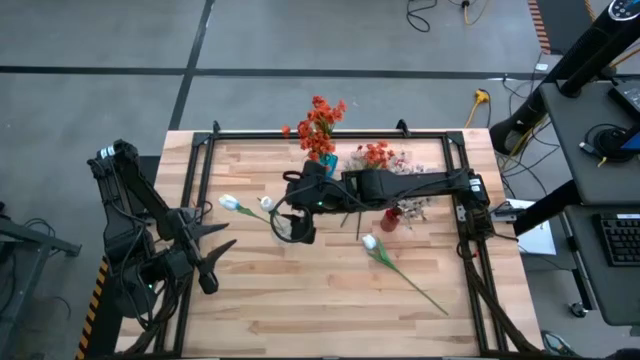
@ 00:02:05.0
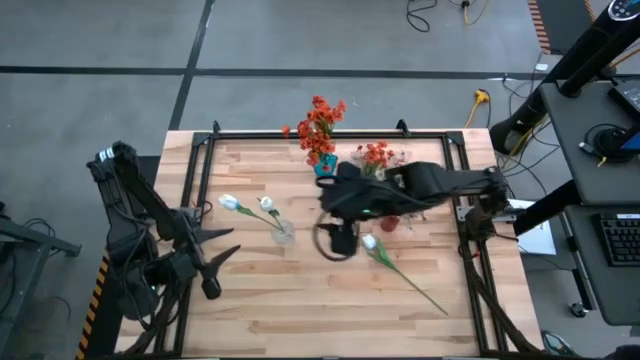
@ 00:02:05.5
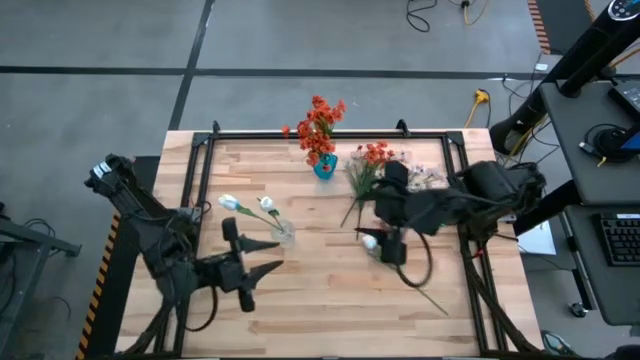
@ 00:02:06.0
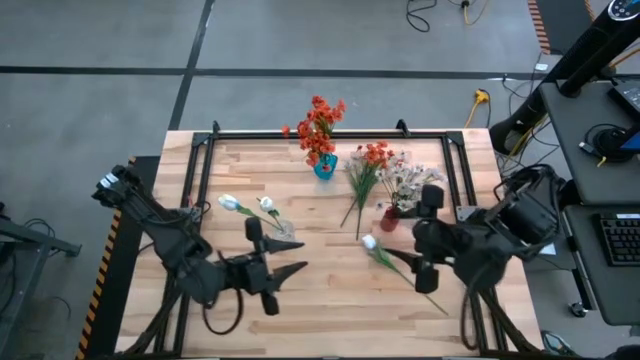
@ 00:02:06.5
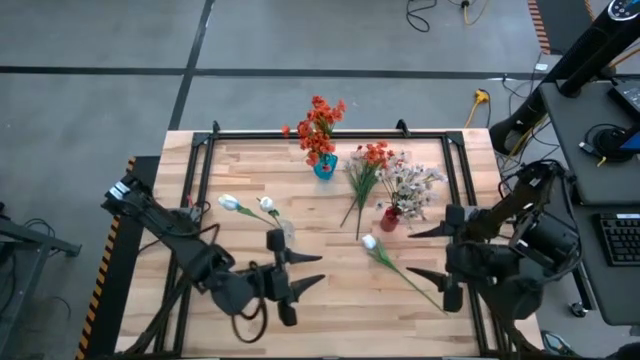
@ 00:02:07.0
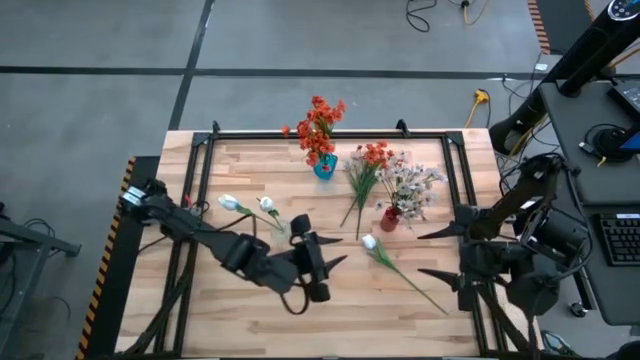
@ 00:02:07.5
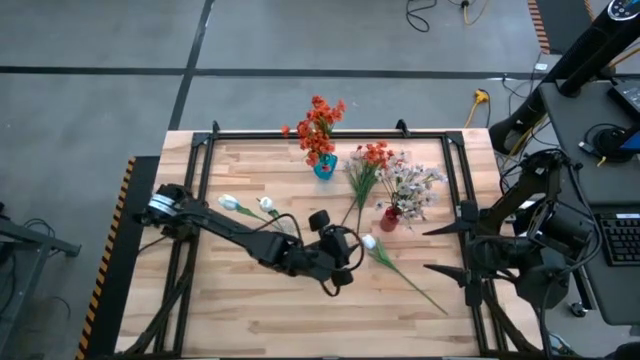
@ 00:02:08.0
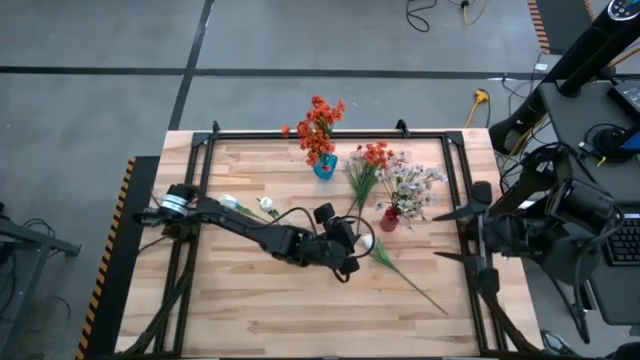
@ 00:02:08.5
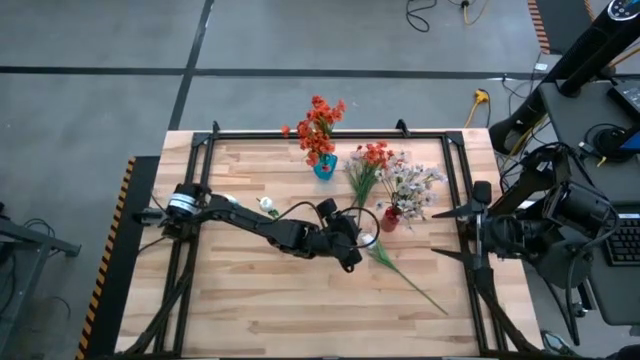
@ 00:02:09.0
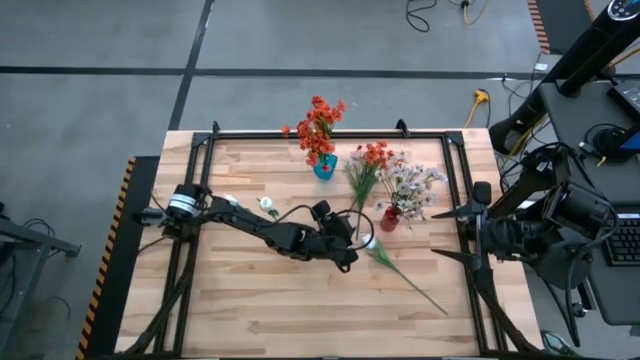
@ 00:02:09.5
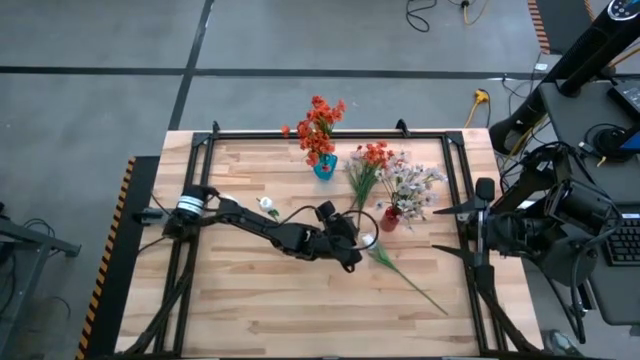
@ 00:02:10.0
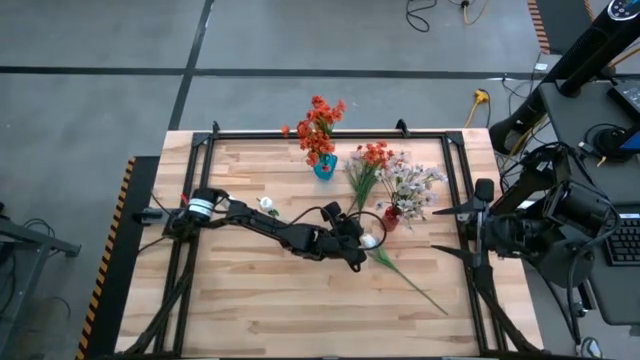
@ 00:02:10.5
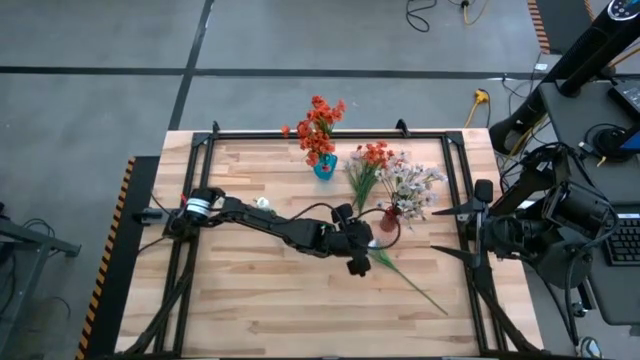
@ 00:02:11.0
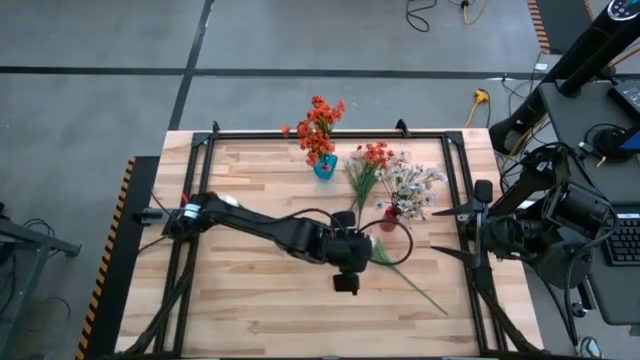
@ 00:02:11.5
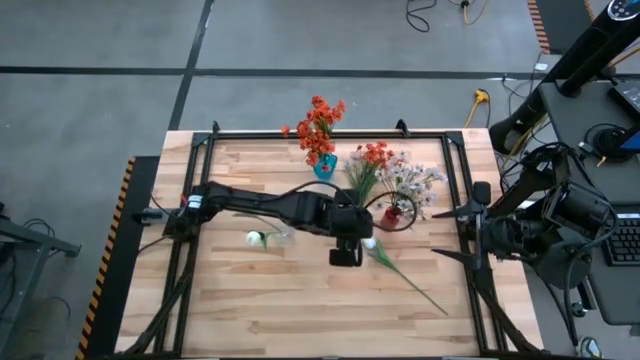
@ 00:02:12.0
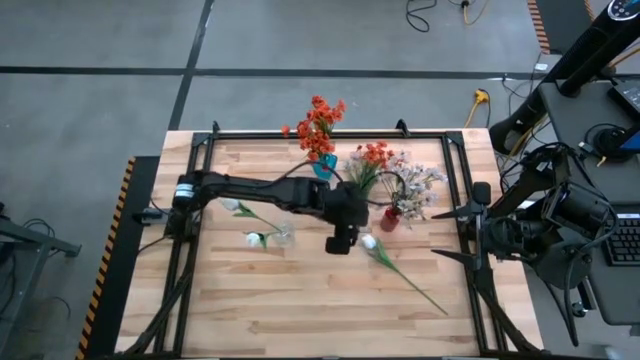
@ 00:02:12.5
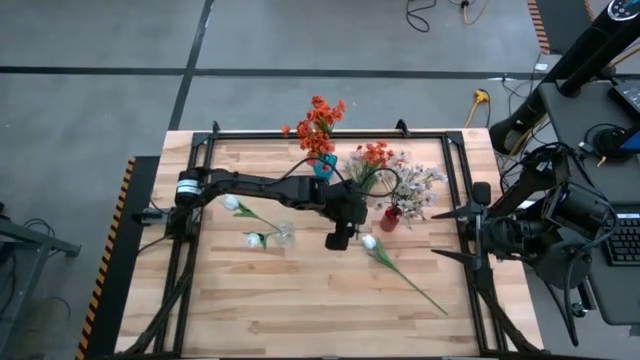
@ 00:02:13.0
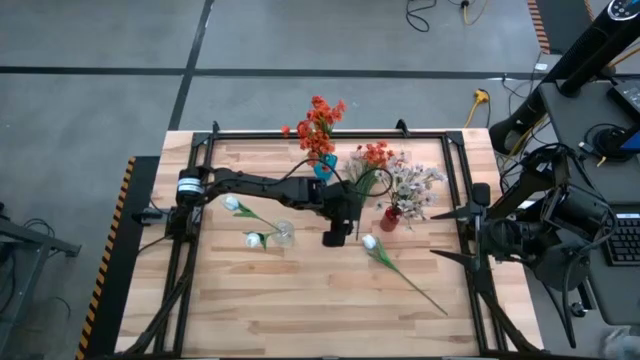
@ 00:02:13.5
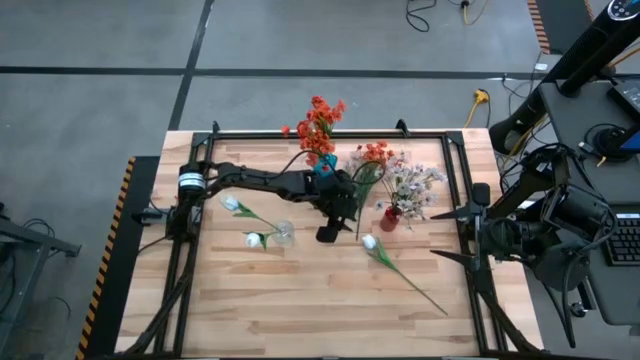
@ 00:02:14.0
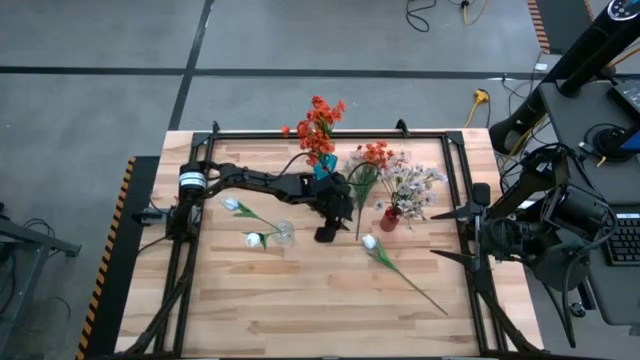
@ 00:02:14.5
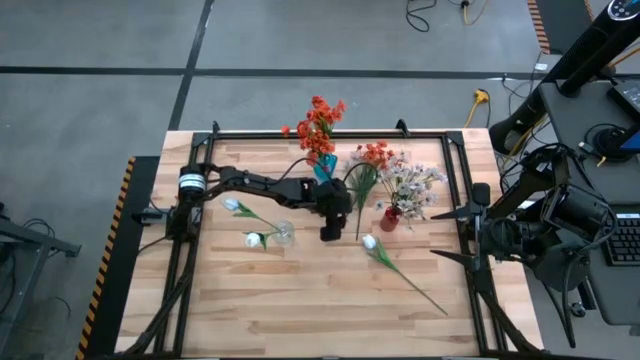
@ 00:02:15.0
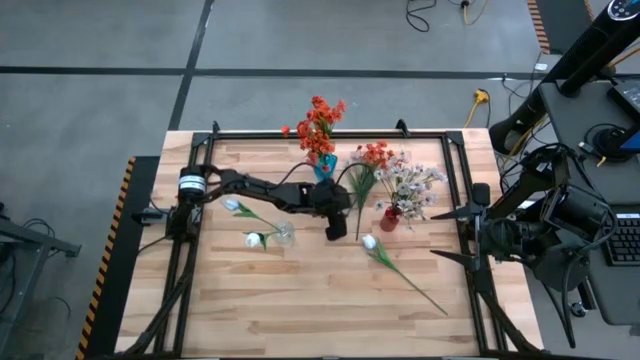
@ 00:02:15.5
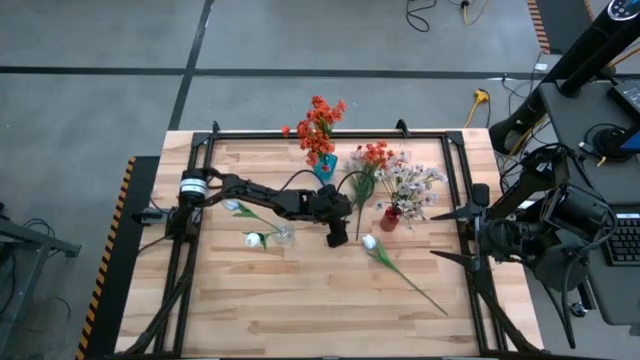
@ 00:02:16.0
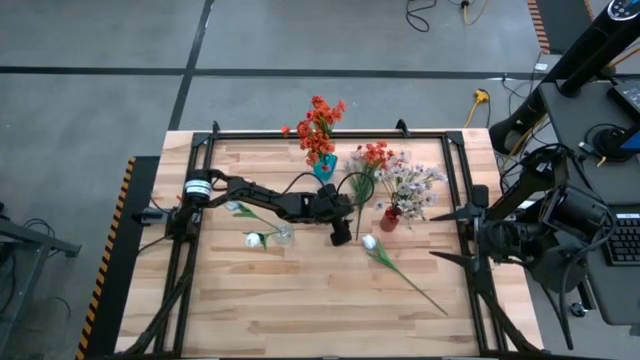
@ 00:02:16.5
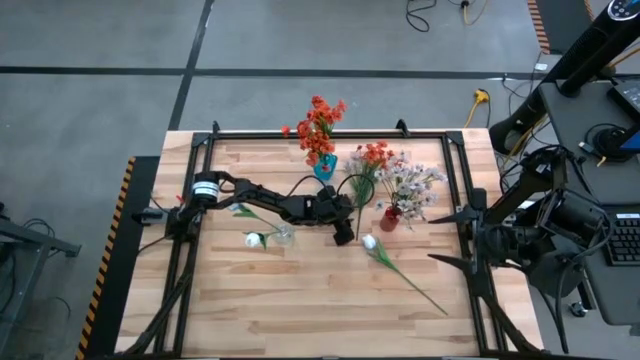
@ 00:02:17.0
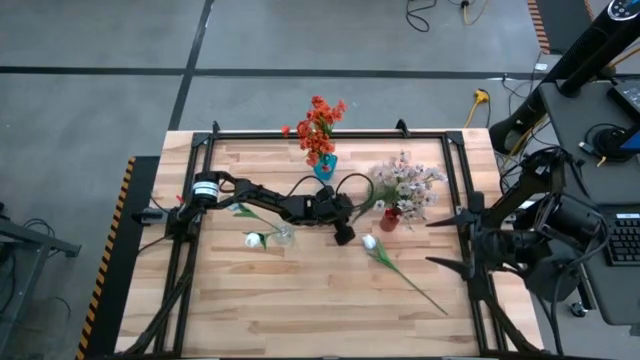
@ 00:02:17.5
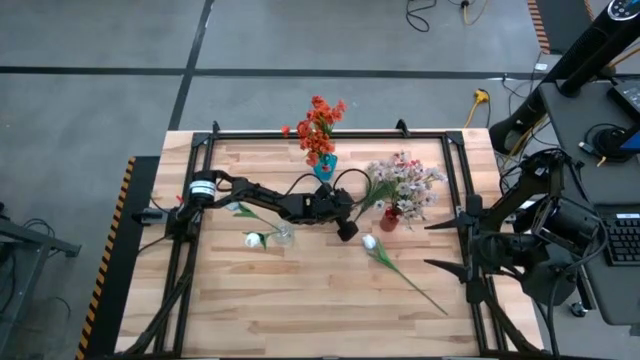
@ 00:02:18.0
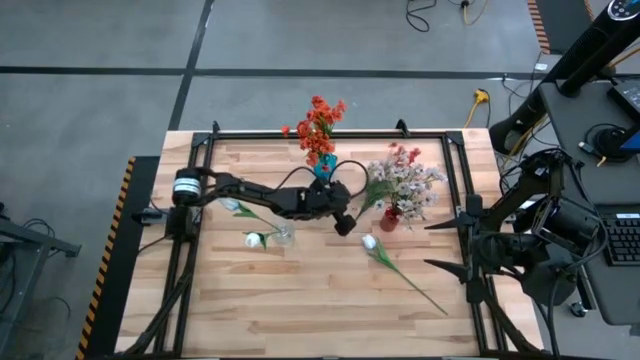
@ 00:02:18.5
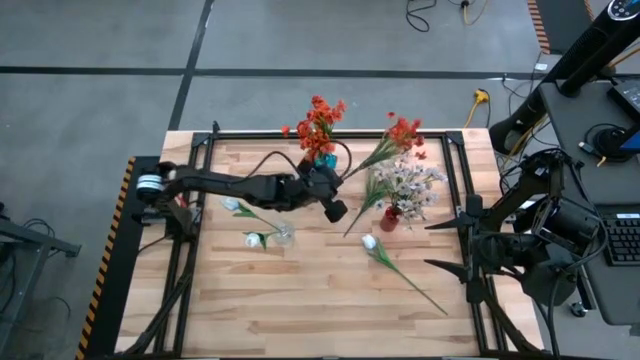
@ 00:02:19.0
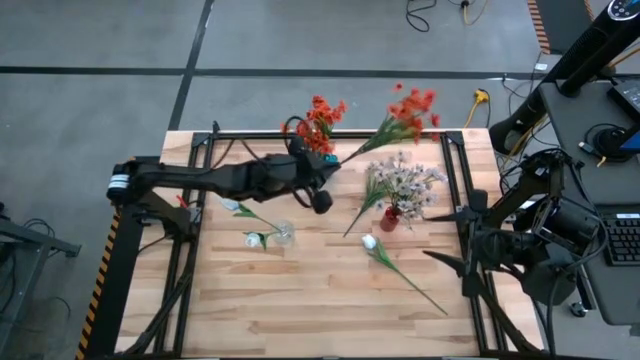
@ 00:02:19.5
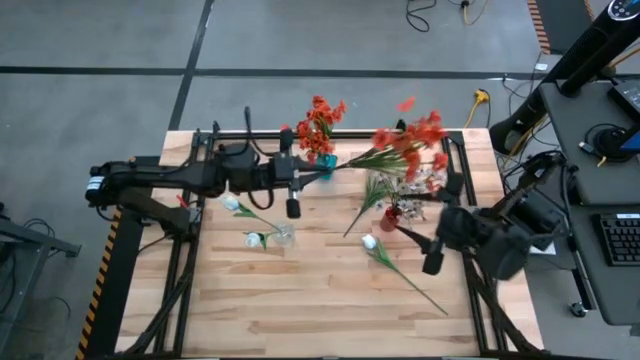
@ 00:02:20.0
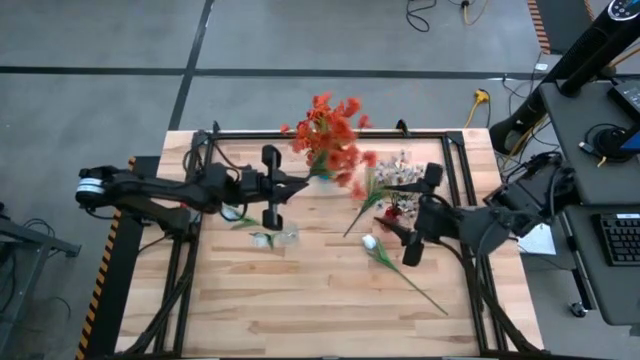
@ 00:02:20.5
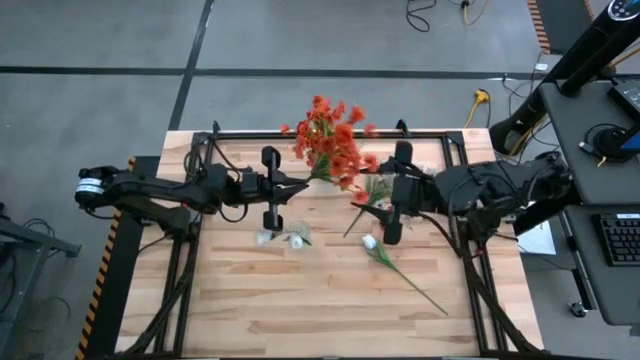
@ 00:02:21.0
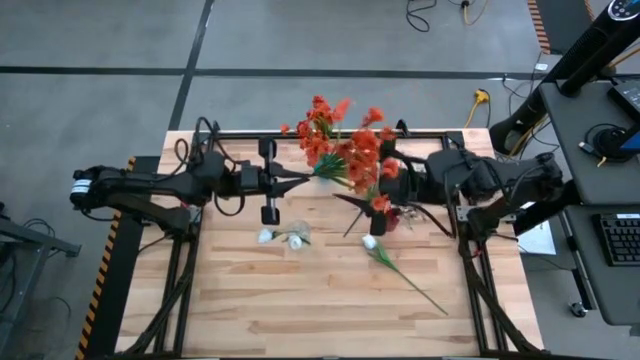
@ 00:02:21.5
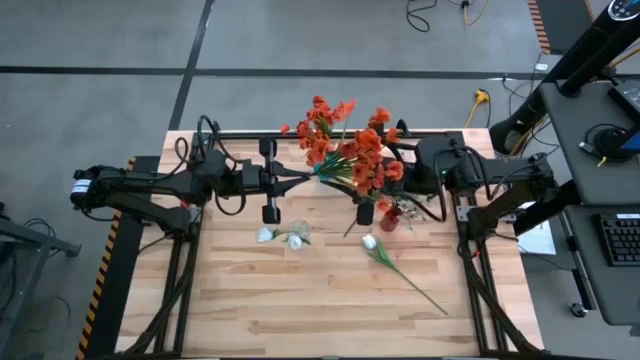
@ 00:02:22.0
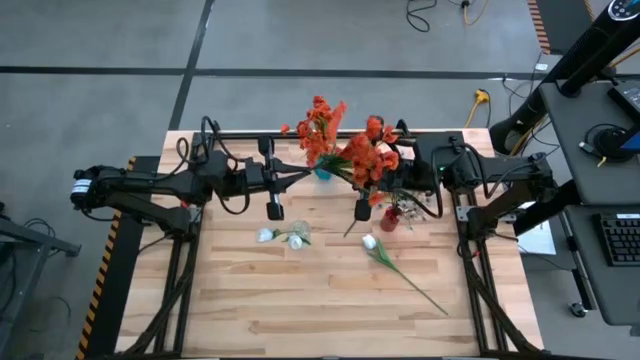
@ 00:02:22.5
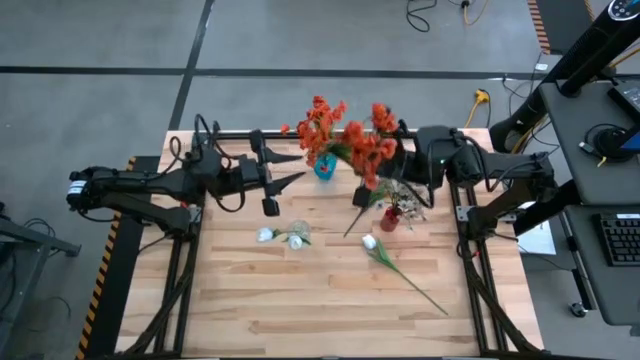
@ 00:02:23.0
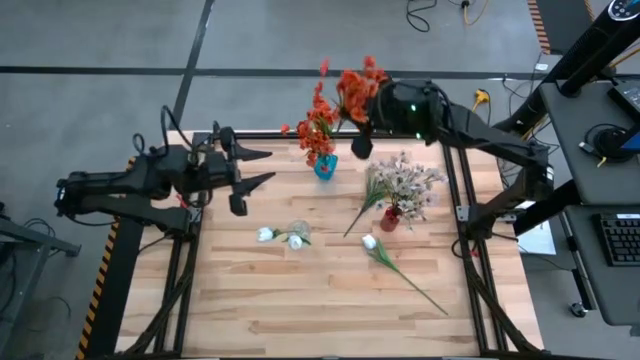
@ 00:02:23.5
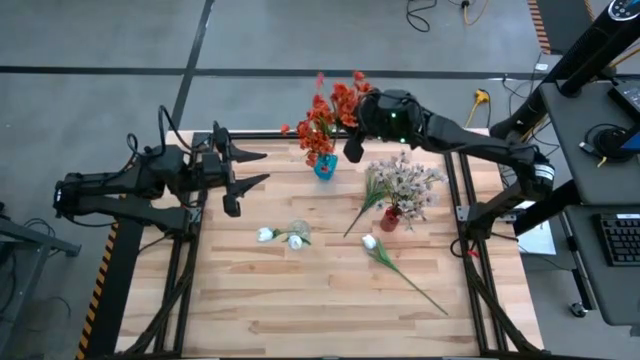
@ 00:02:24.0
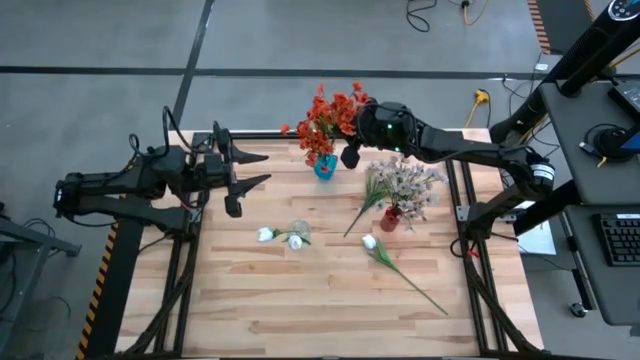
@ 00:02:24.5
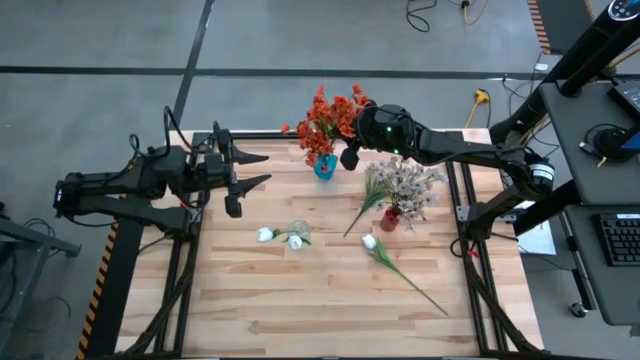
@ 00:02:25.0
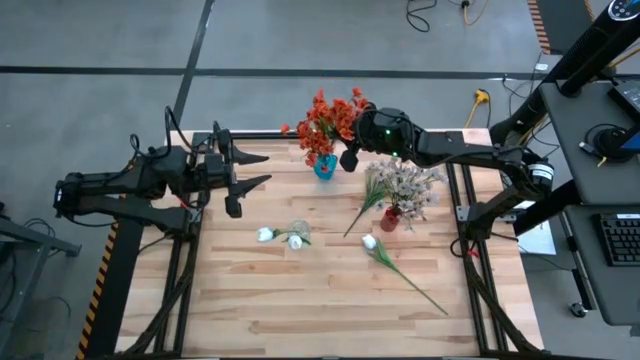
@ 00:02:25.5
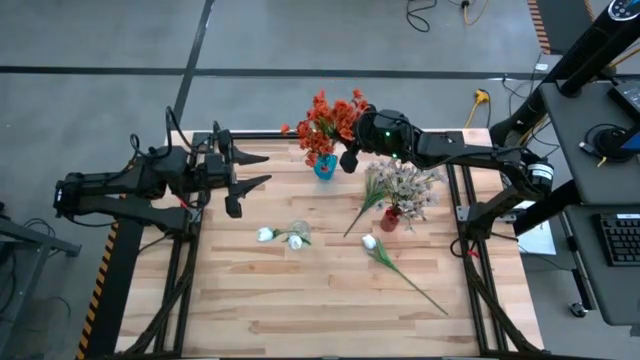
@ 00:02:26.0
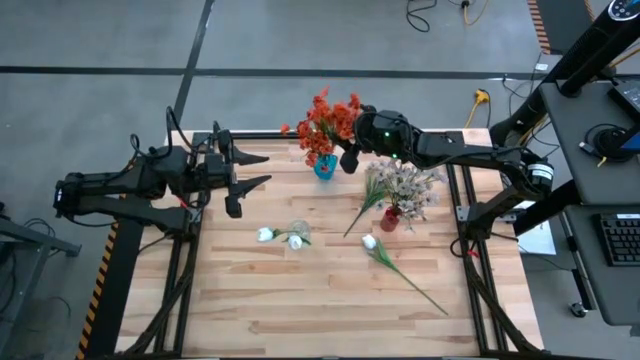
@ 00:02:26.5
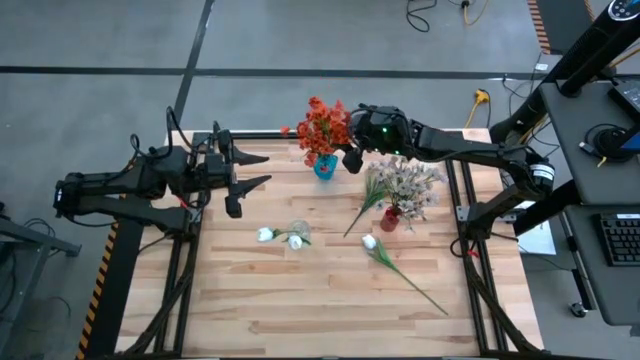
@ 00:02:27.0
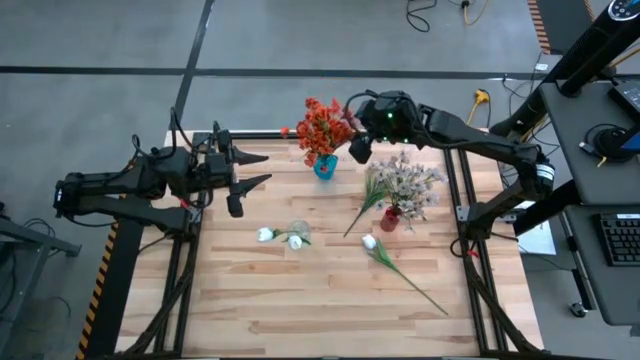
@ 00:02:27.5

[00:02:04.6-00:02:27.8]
Task: Sort flowers into vase by color
Put the orange flowers into the blue vase
